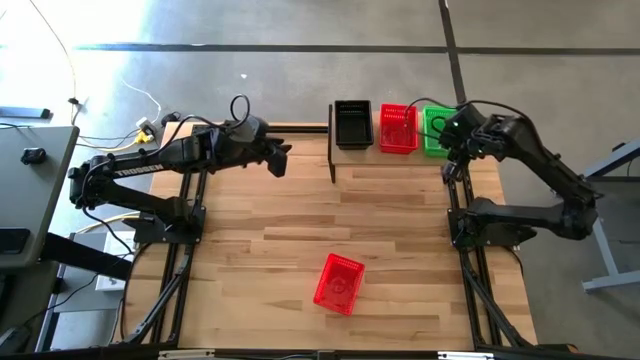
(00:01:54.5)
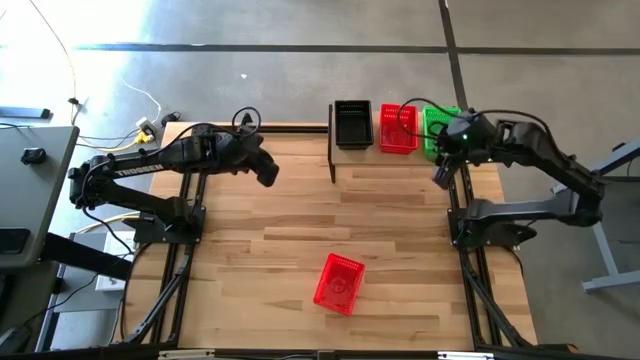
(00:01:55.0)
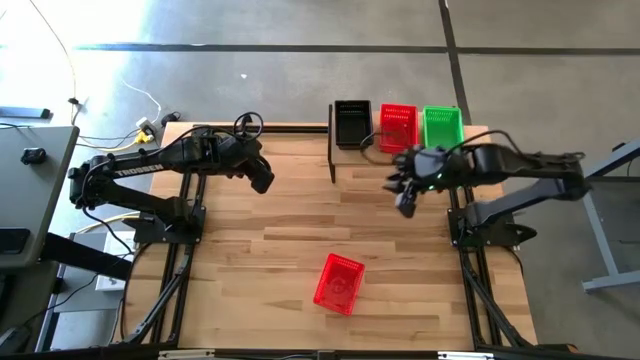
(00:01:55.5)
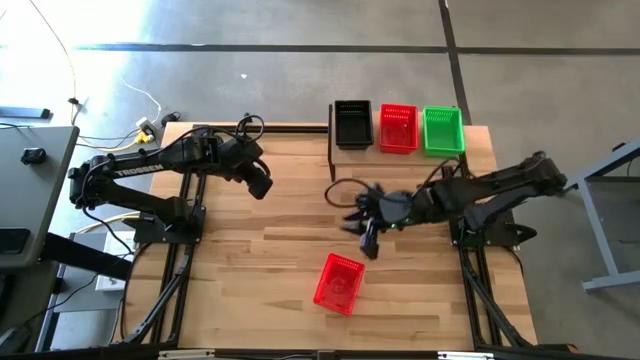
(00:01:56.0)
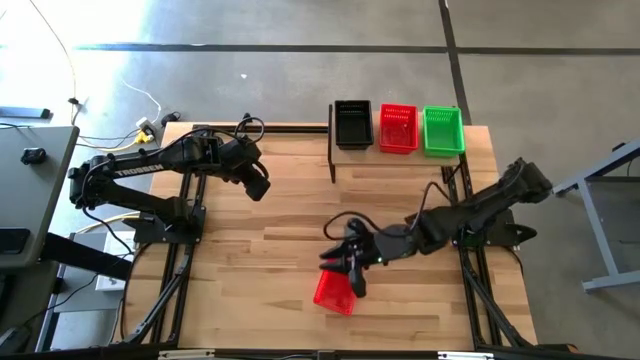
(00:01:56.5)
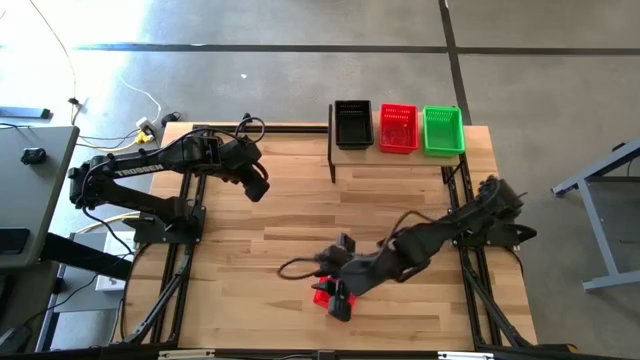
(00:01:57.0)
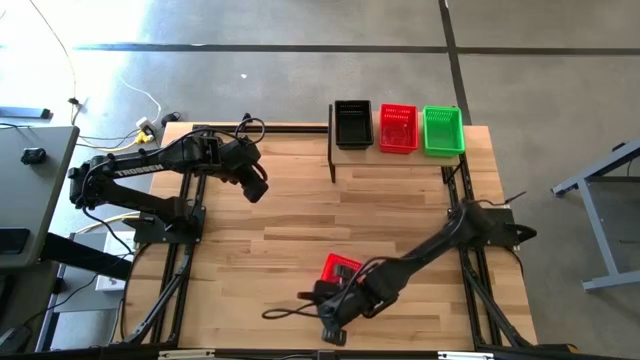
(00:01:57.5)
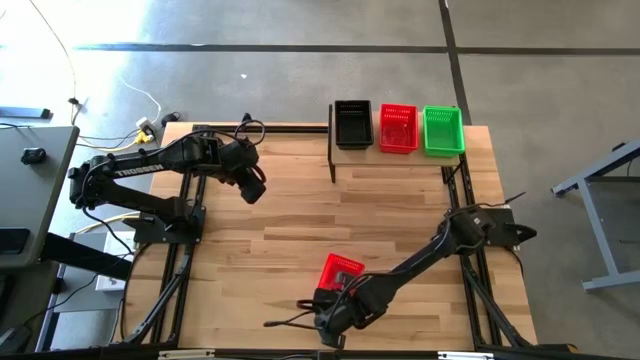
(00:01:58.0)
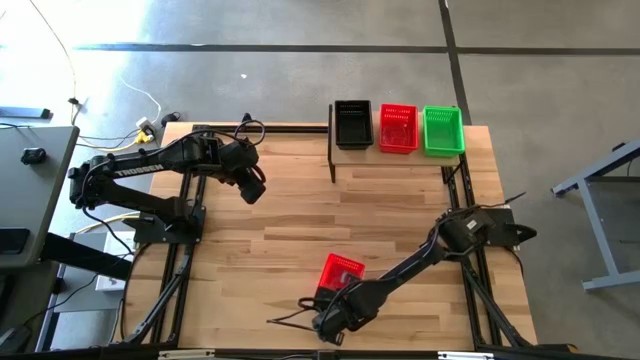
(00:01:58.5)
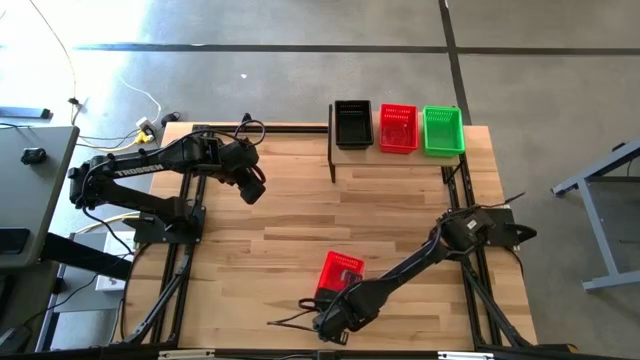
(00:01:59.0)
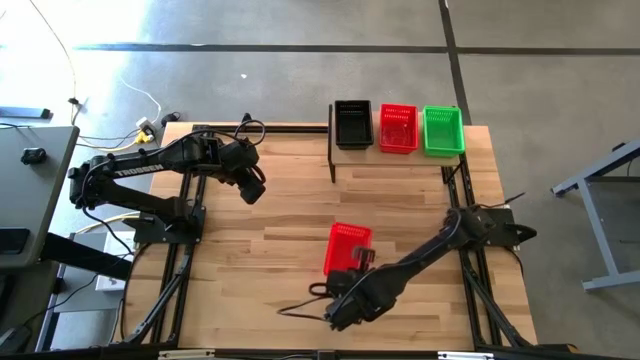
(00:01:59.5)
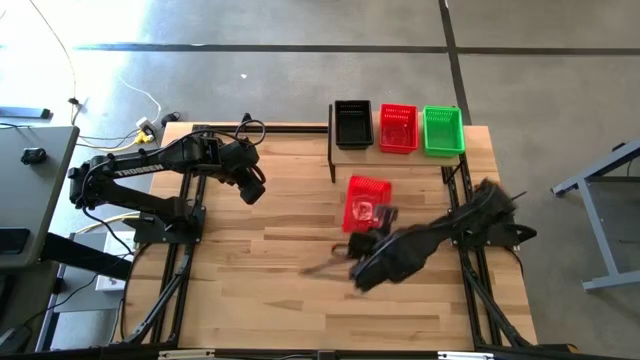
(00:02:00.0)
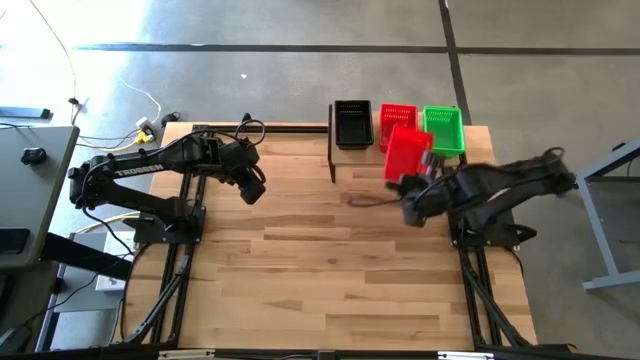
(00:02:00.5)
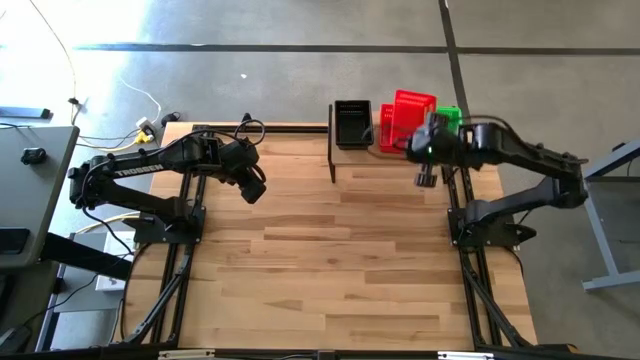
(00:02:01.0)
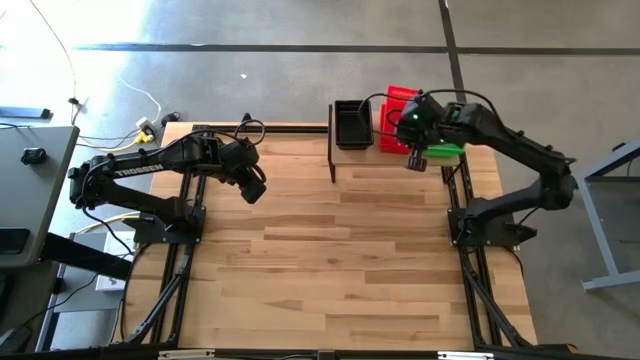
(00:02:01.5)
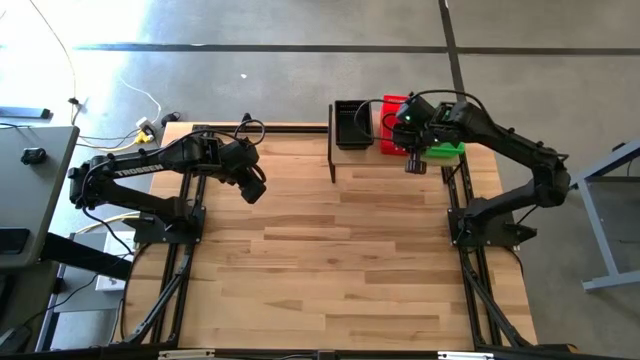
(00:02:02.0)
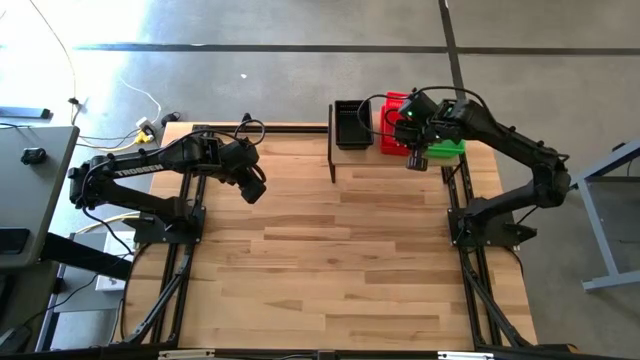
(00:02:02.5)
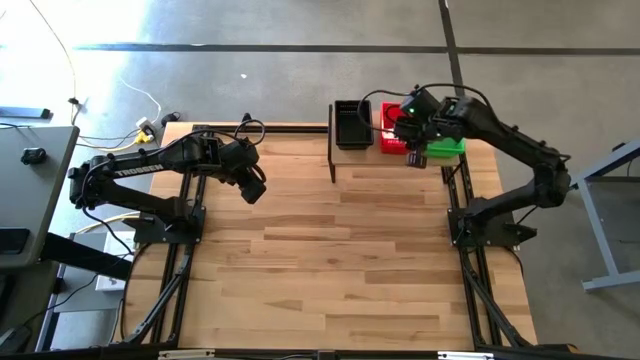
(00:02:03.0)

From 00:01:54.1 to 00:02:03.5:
Task: Stack baskets on shelf by color
Stack the red bin on top of the red bin on the shelf

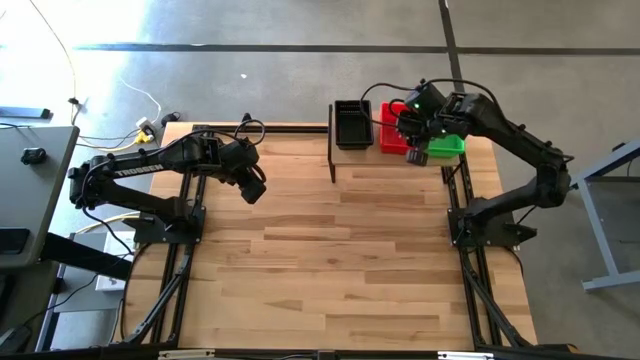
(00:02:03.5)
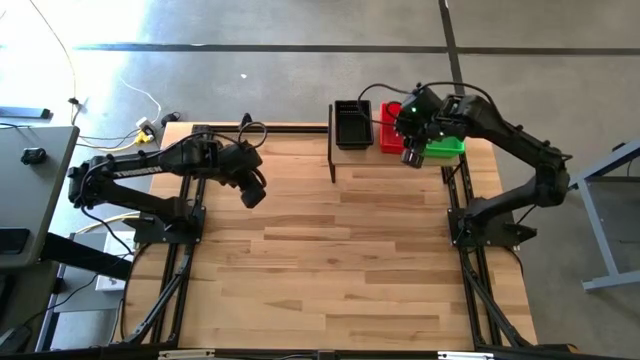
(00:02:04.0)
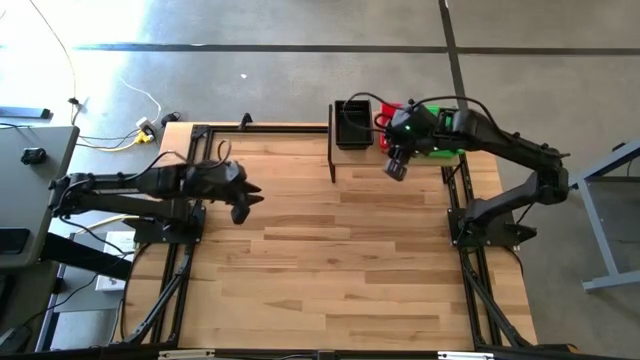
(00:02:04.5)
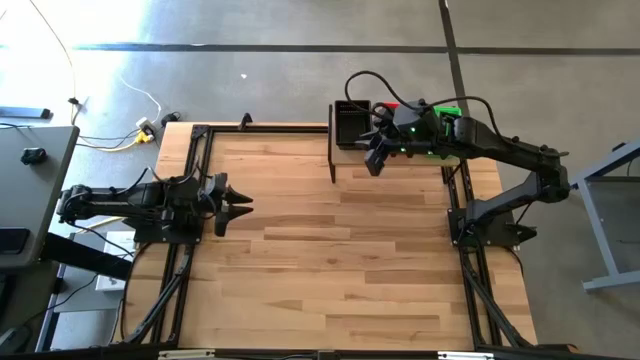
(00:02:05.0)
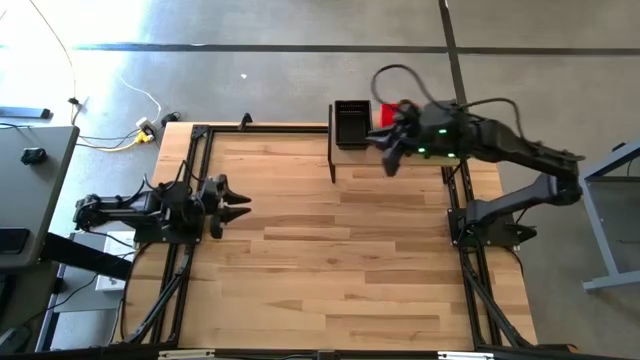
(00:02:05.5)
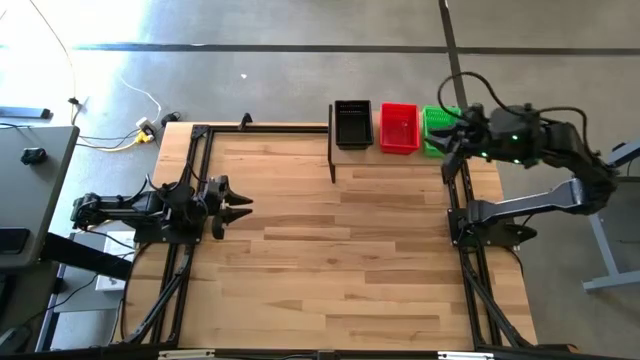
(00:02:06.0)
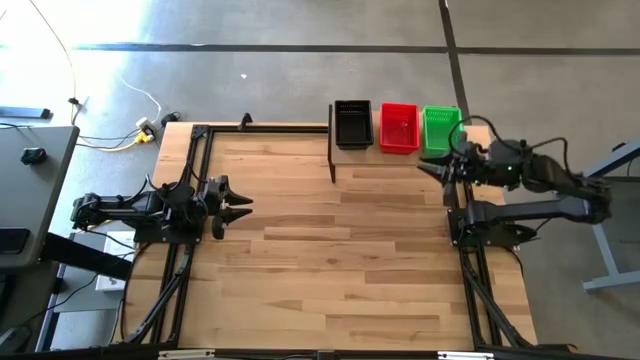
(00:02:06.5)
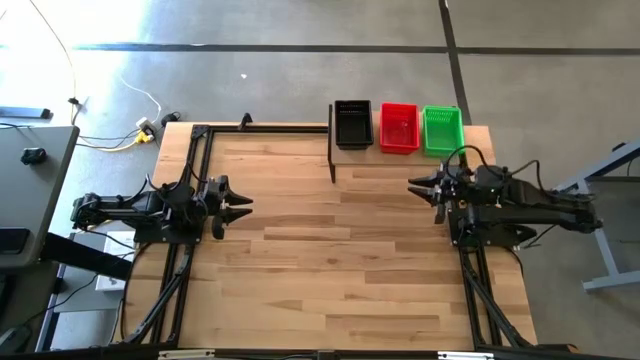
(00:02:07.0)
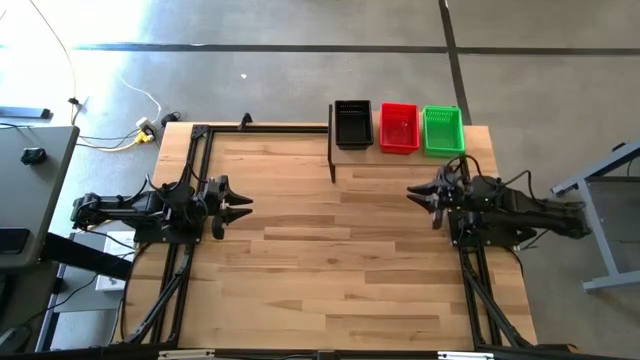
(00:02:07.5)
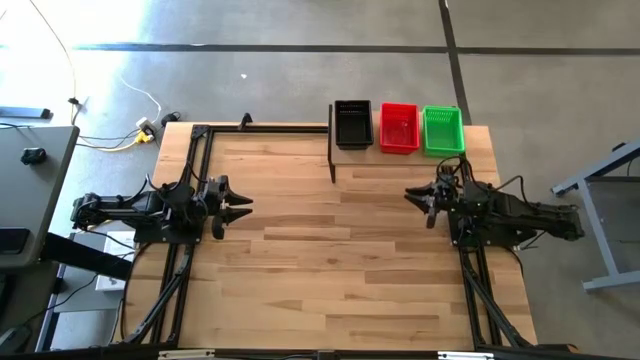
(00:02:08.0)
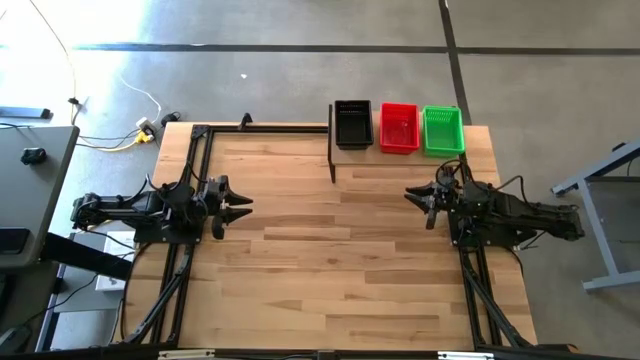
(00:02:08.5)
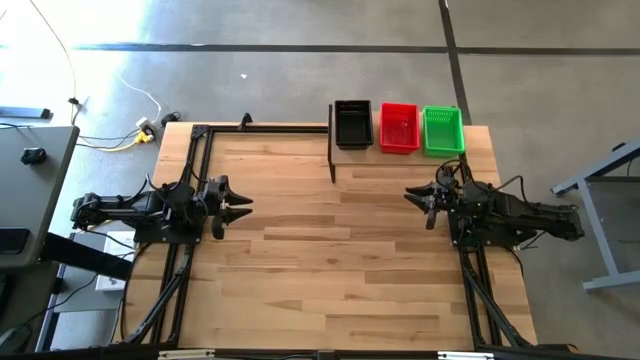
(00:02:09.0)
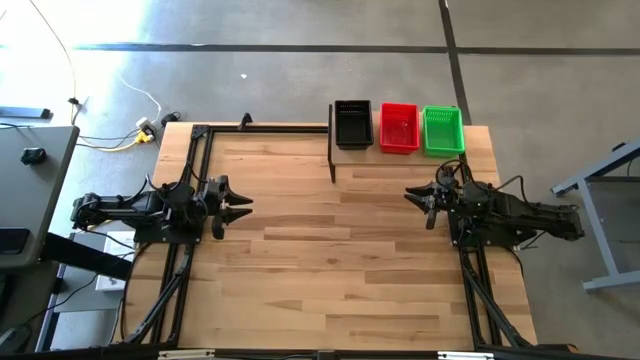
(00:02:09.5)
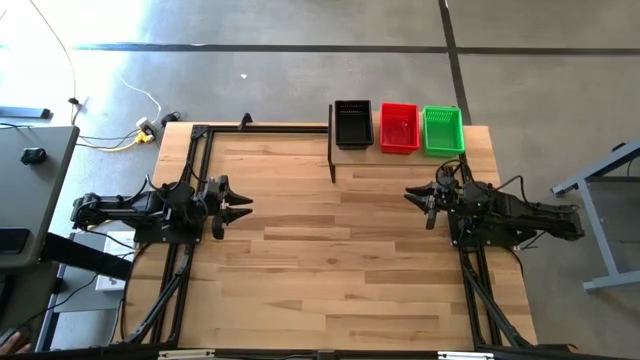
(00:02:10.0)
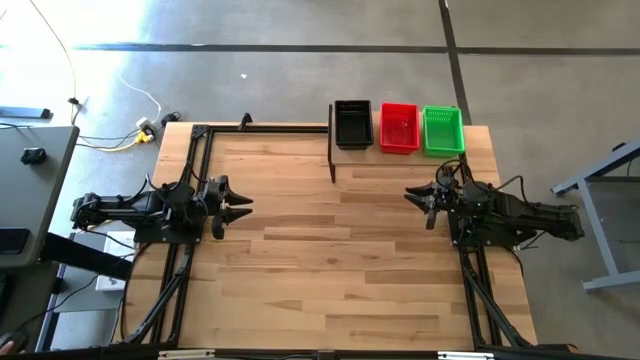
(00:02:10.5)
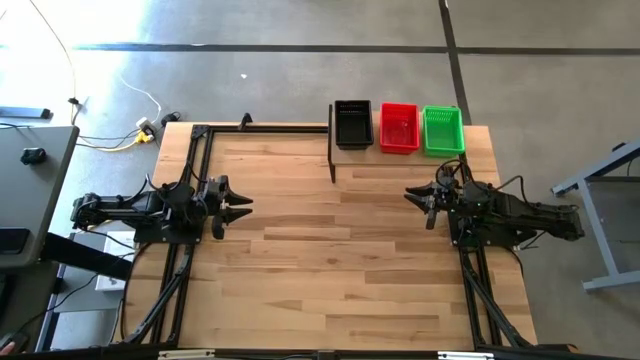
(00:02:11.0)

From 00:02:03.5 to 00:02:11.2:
Return to Home Position

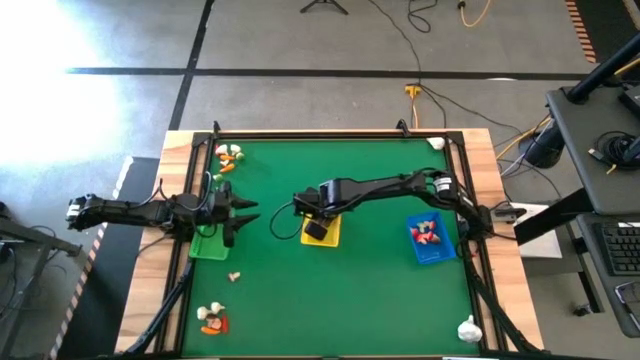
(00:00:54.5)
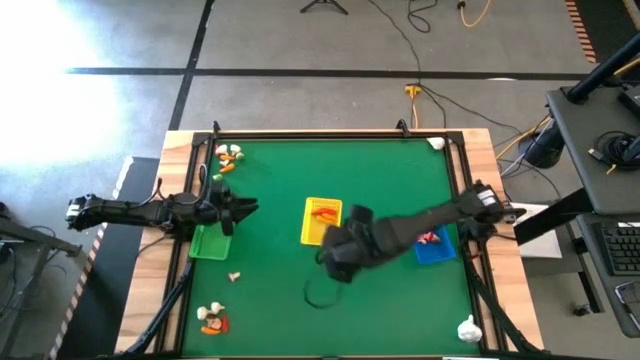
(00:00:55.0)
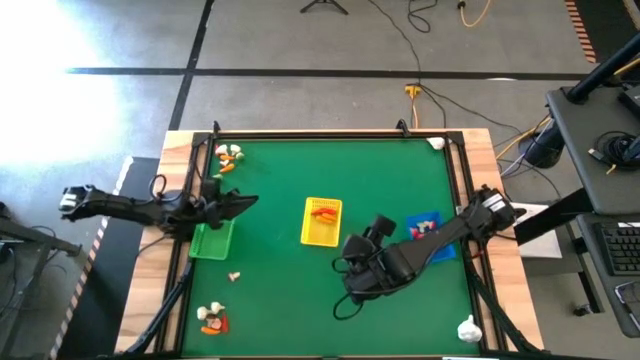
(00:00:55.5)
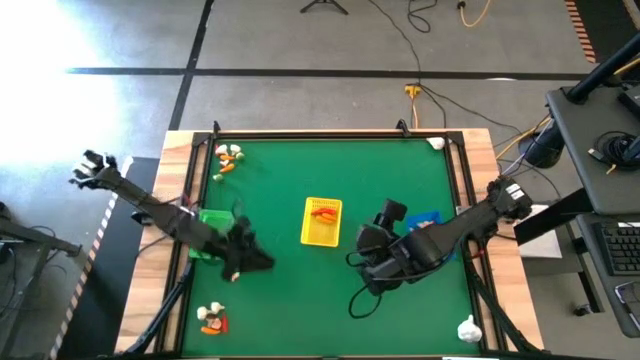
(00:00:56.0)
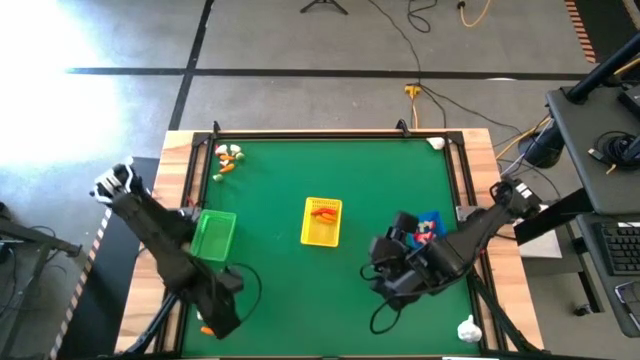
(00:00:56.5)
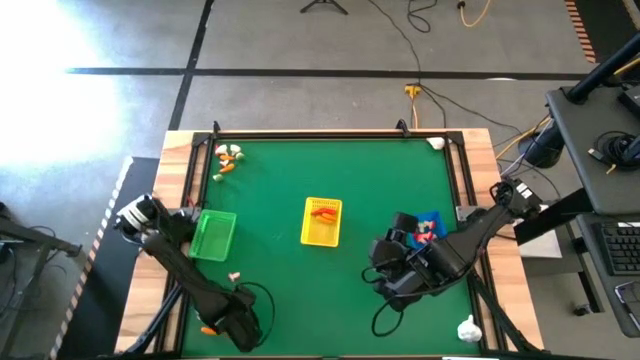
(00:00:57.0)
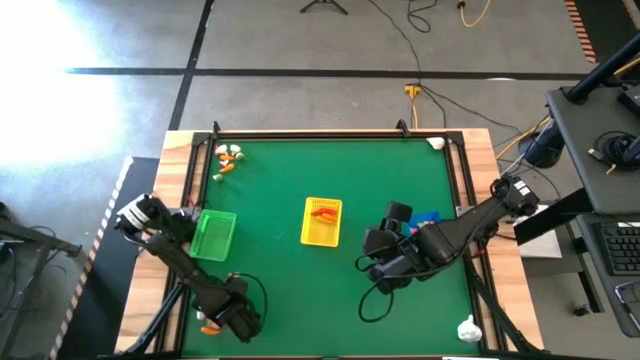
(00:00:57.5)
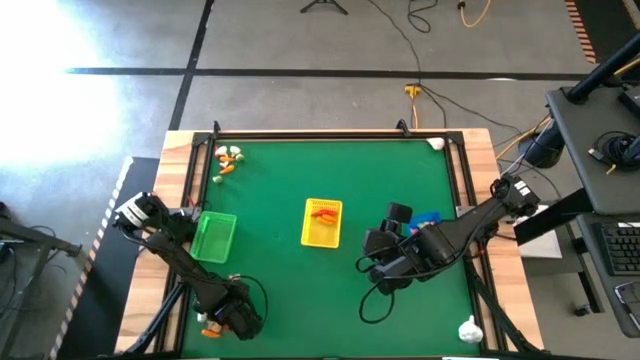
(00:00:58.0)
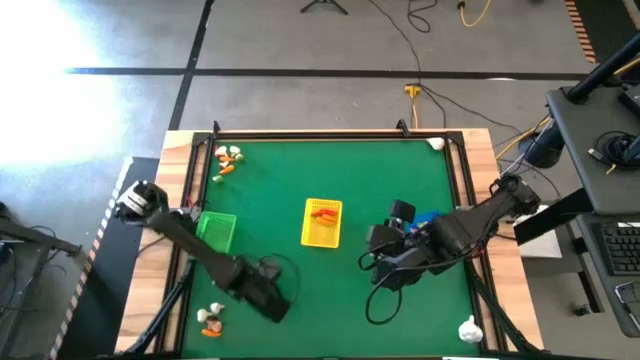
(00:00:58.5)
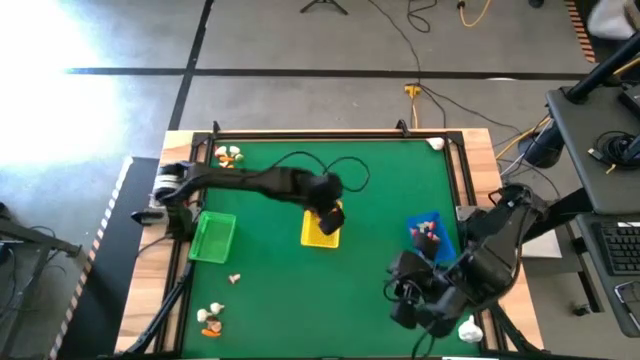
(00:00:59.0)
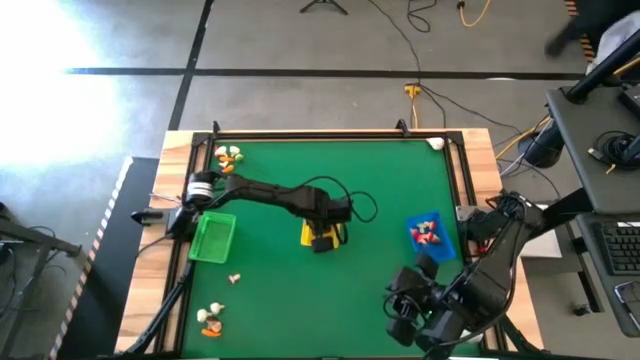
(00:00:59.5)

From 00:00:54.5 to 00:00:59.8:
Task: Sort produce into baskets
Put the red chili pepper into the yellow bin
